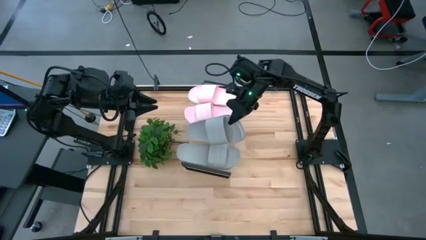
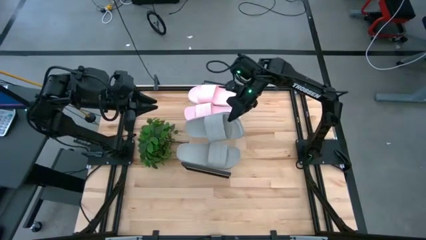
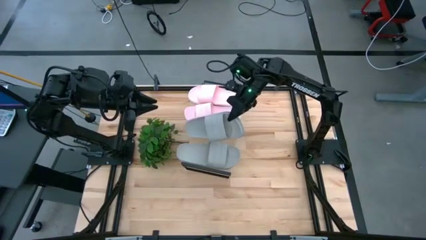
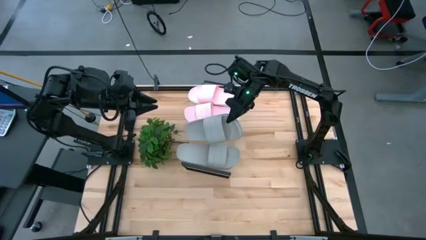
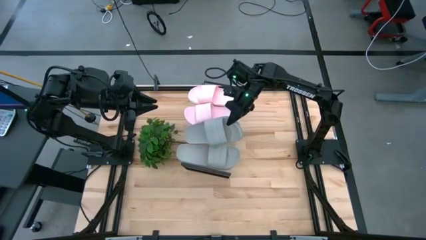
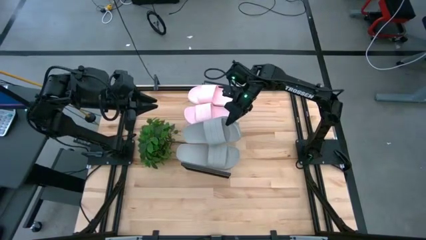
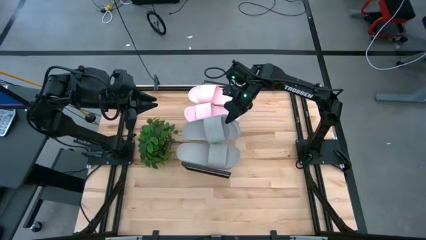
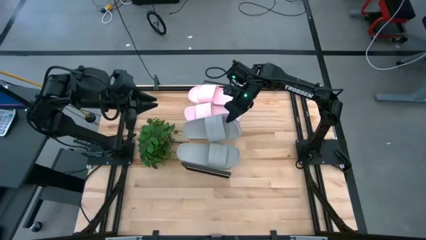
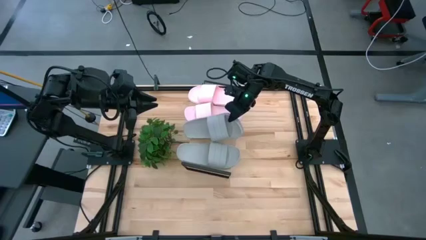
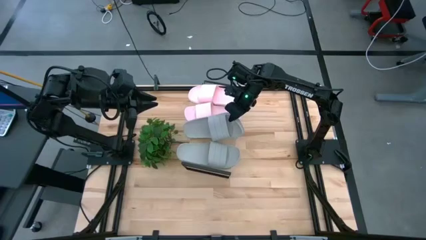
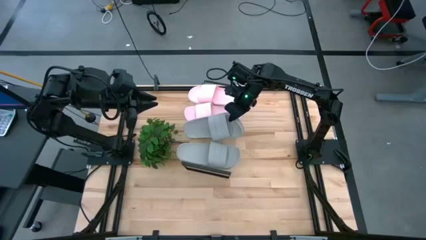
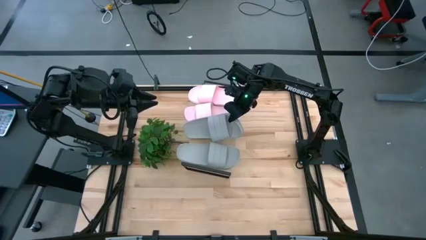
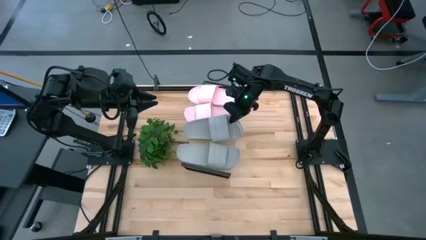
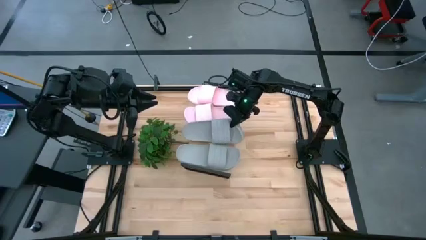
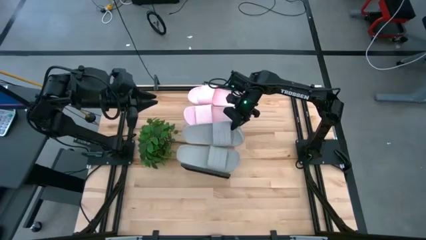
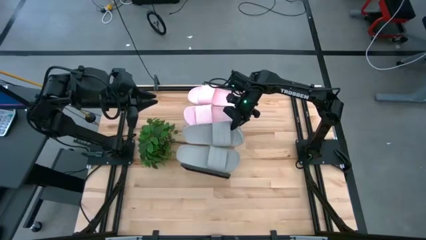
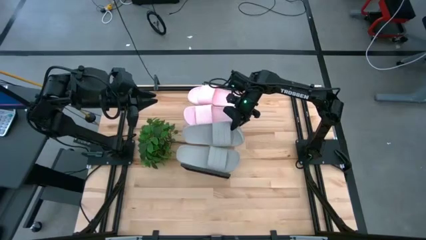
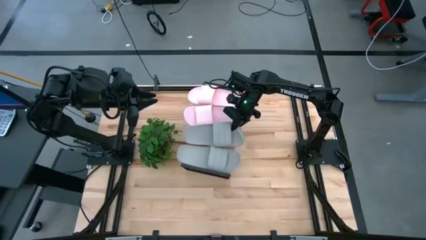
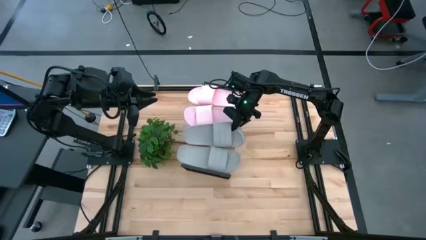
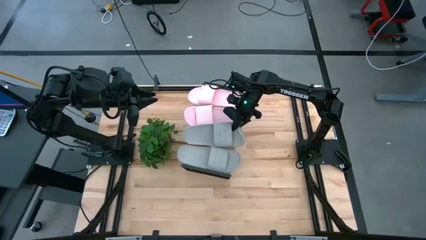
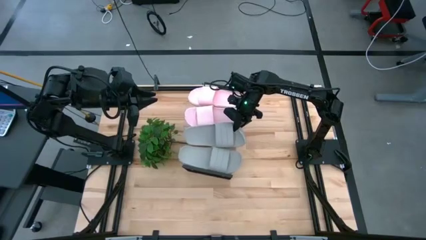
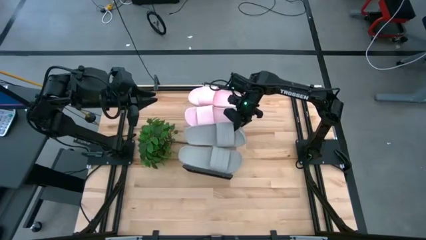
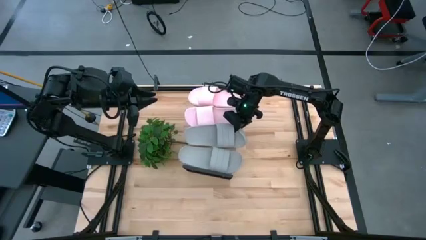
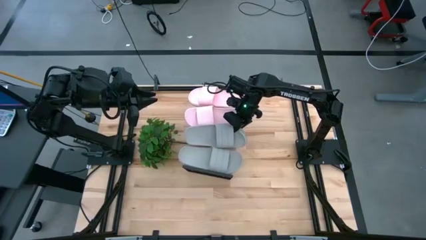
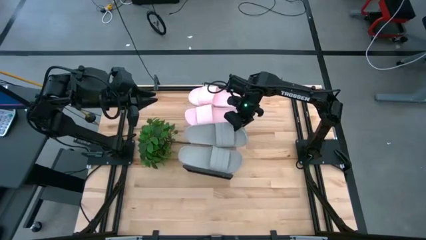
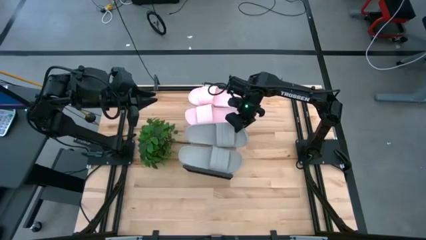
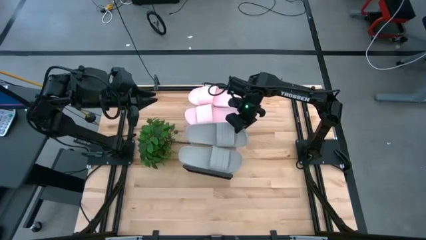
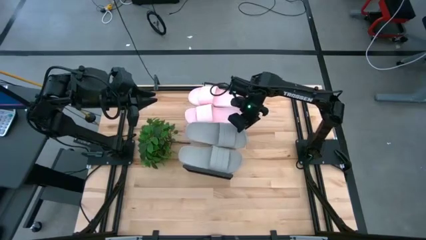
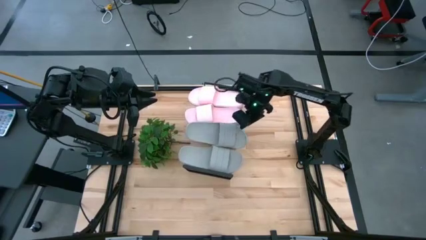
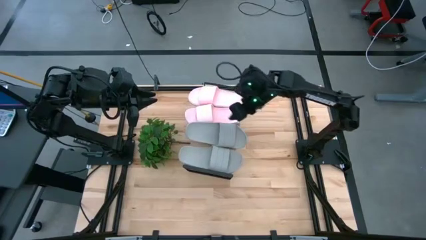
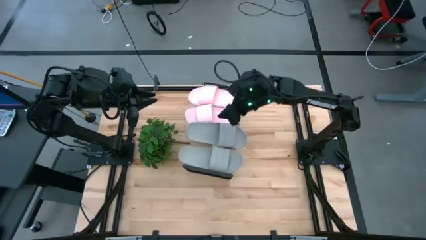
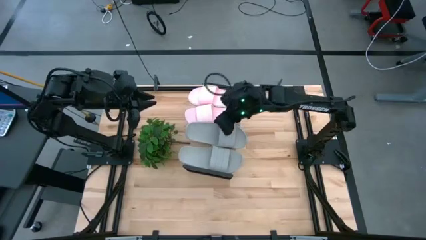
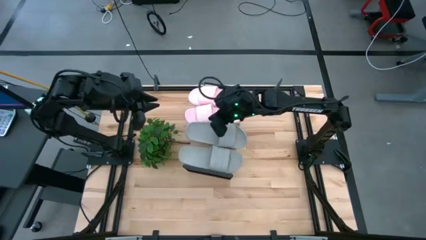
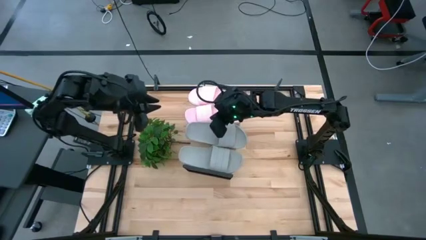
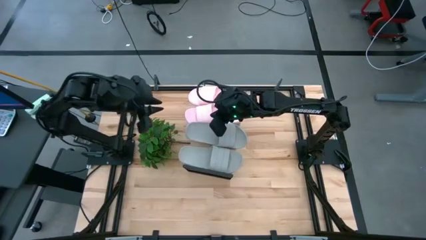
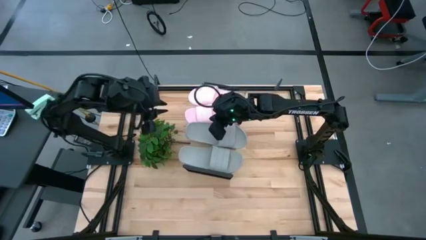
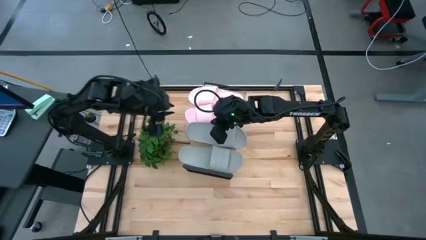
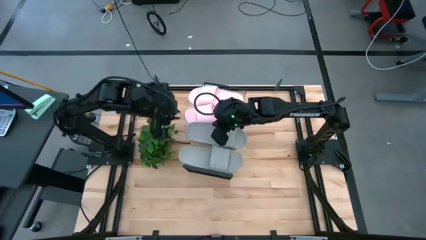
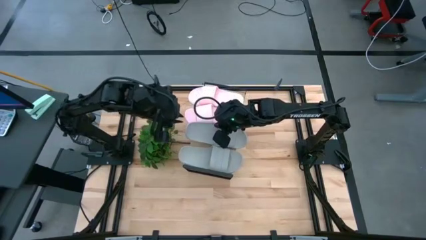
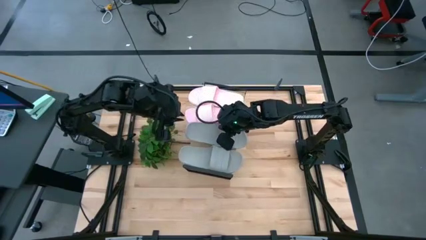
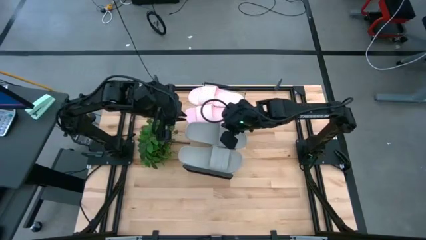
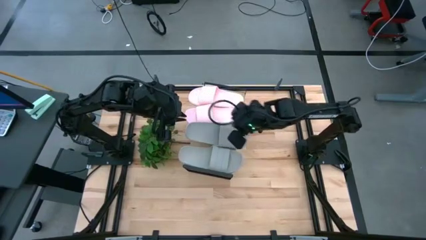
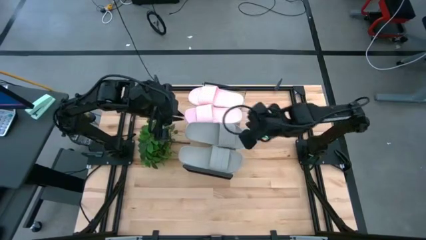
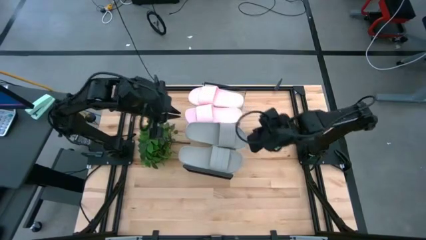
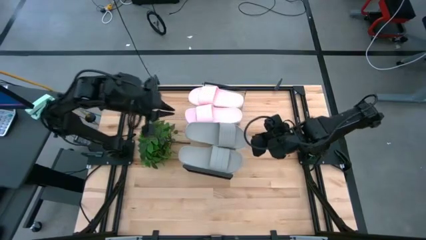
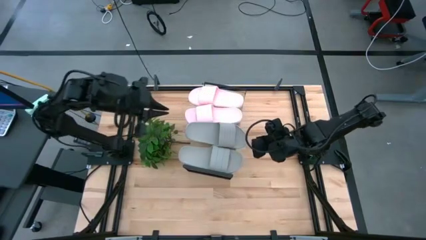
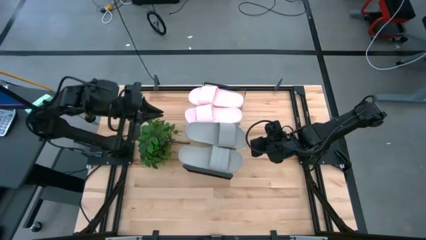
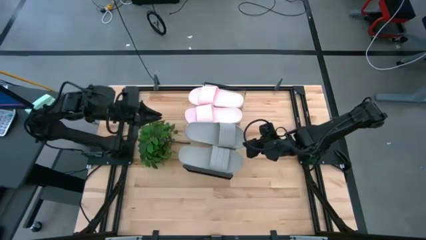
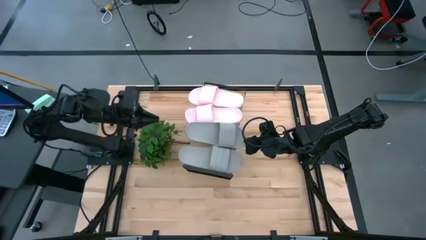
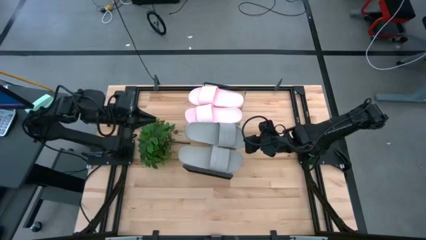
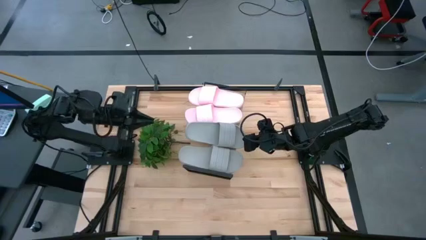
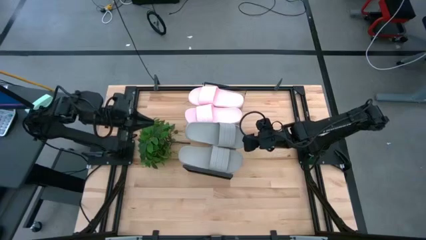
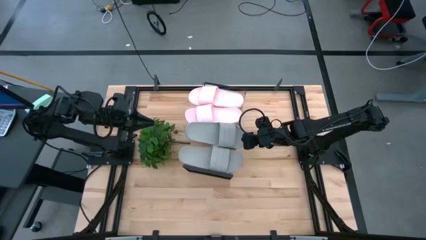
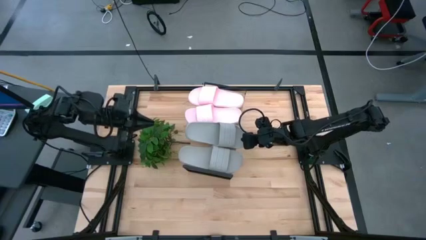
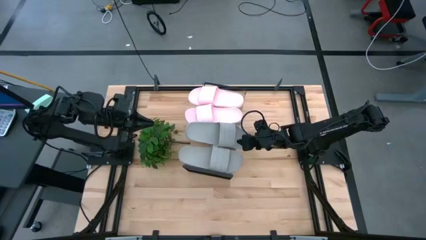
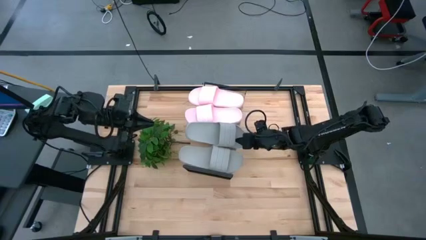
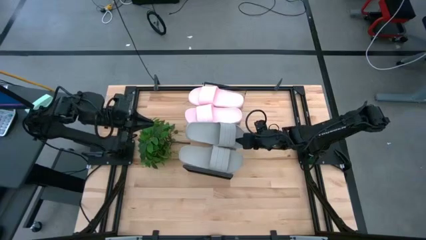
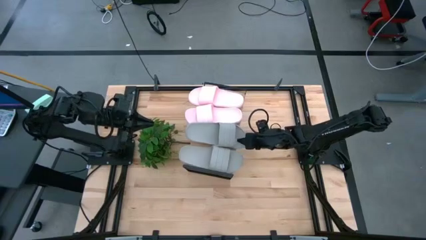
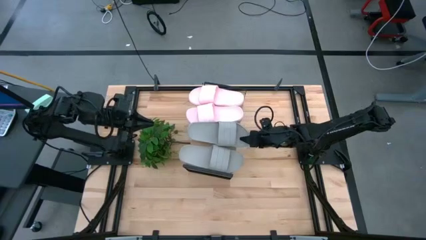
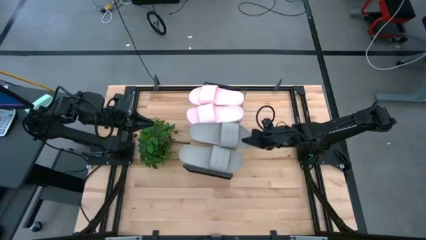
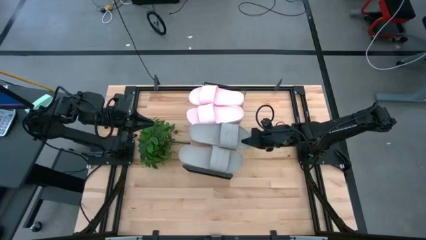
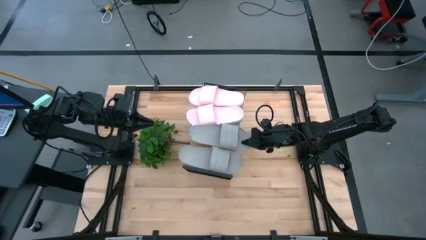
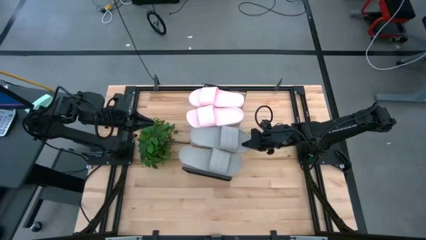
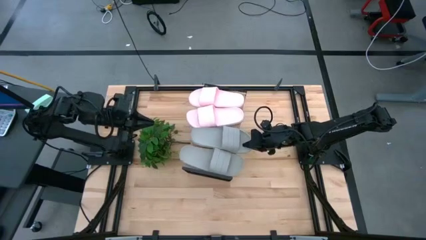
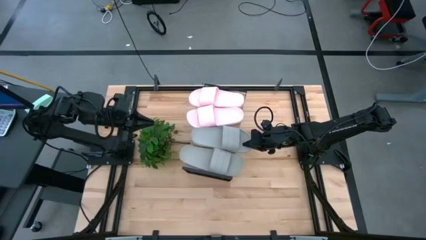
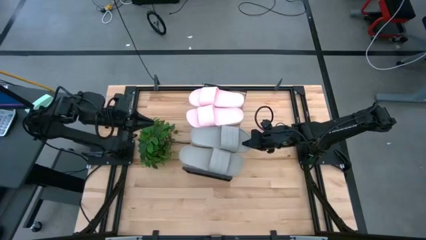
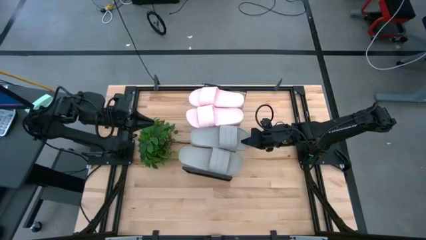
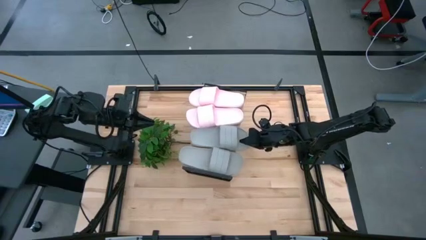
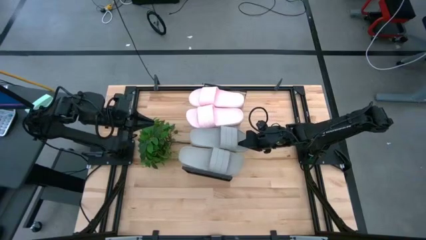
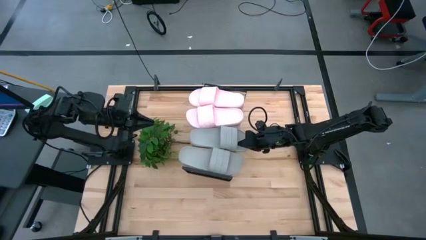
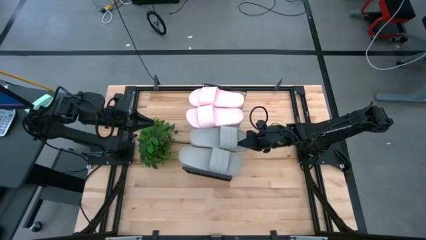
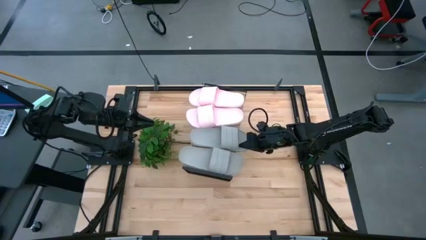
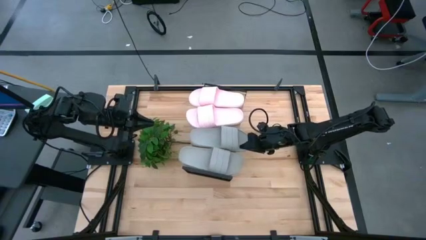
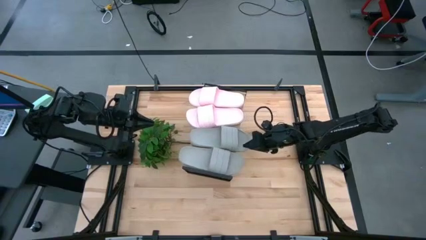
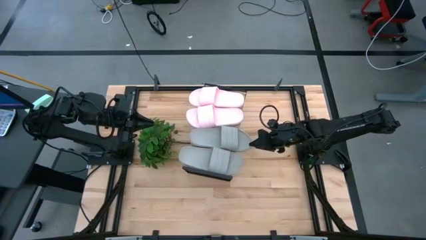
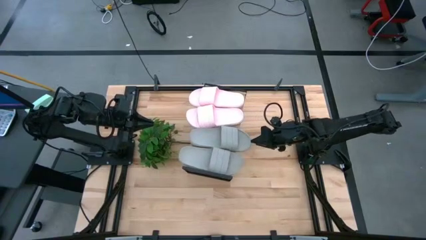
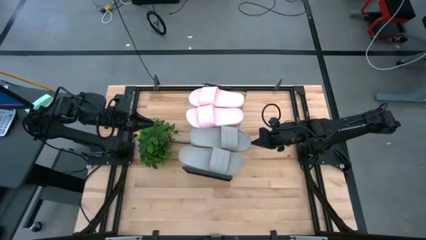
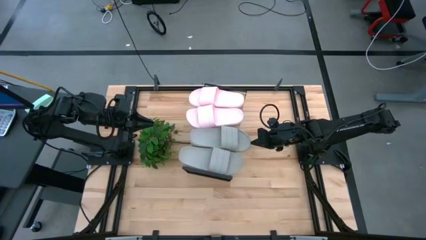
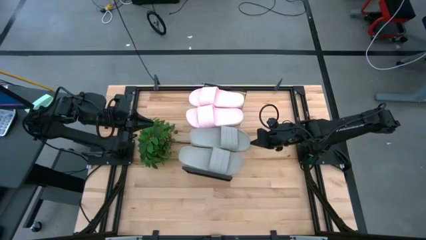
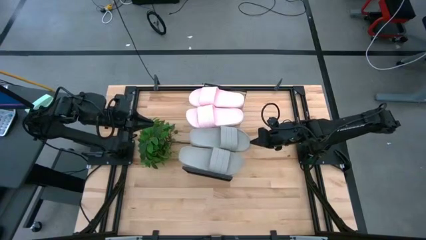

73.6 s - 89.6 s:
Task: Pick and place slides into the shelf
Put the gray slide on the shelf
